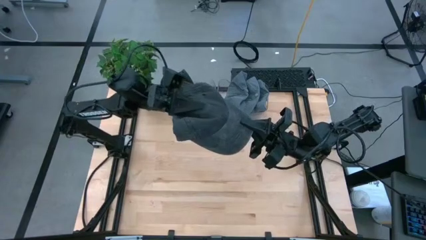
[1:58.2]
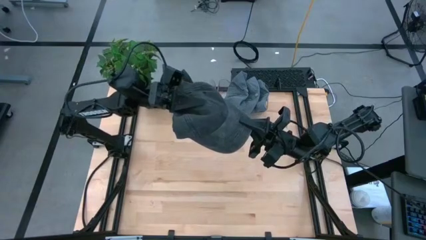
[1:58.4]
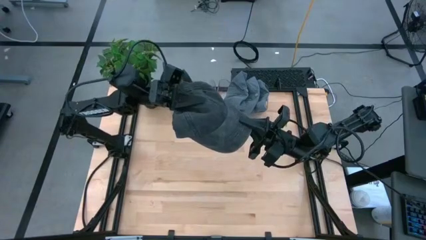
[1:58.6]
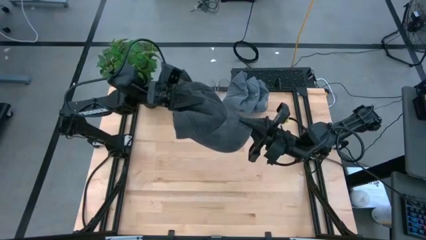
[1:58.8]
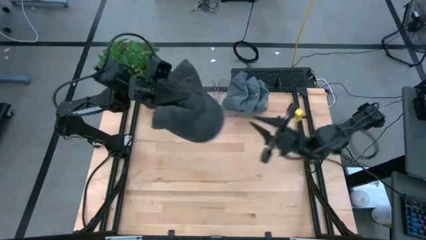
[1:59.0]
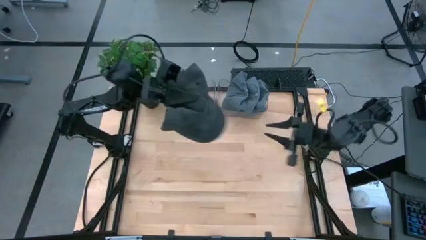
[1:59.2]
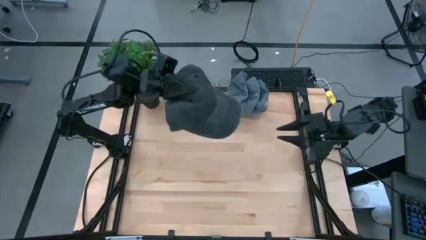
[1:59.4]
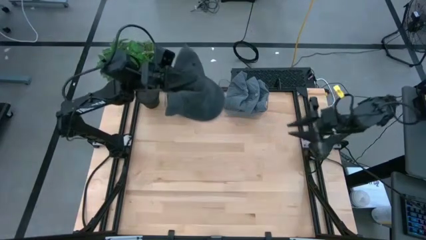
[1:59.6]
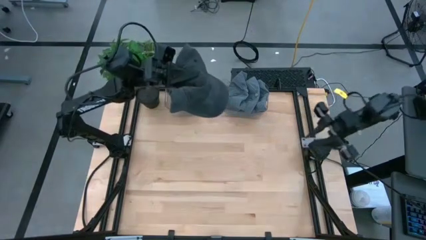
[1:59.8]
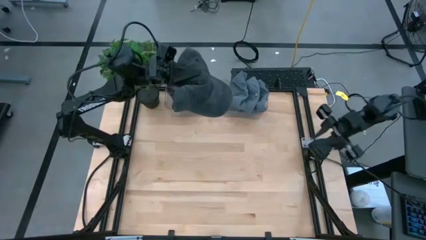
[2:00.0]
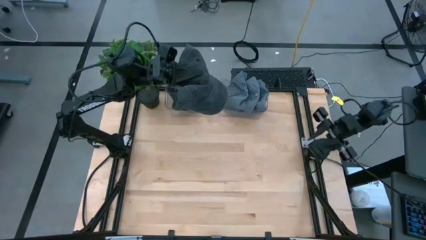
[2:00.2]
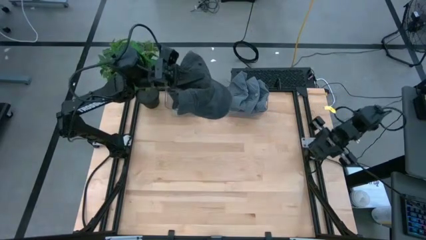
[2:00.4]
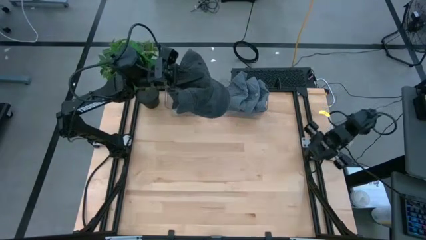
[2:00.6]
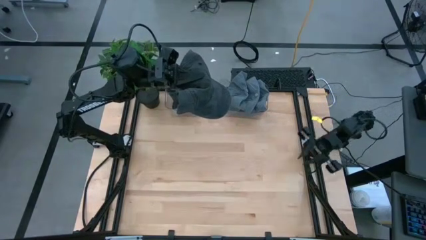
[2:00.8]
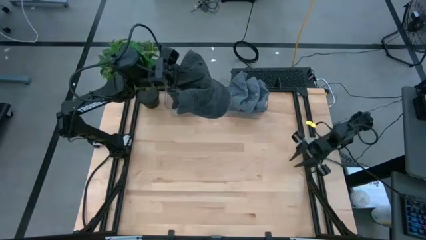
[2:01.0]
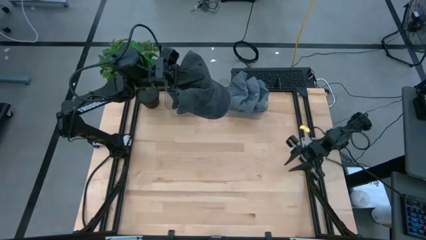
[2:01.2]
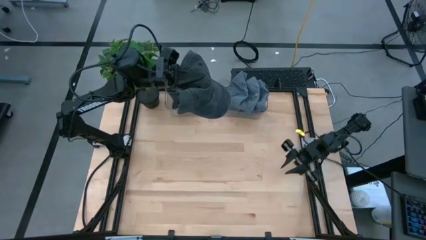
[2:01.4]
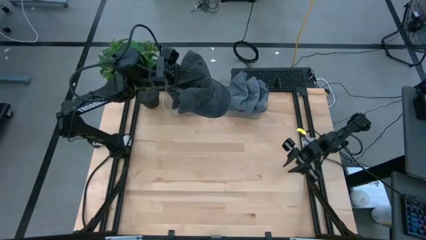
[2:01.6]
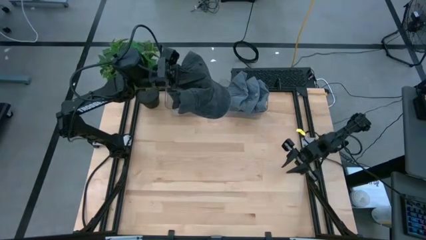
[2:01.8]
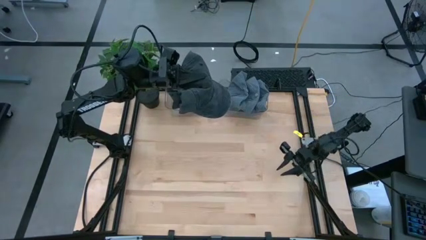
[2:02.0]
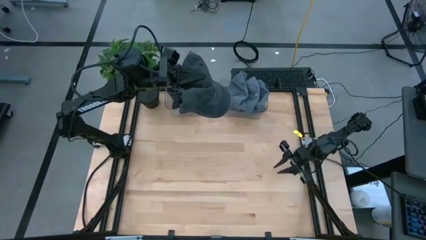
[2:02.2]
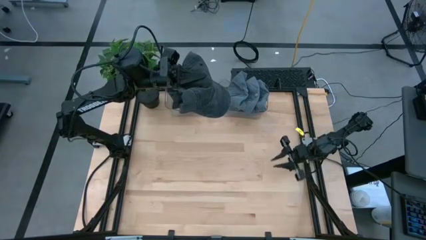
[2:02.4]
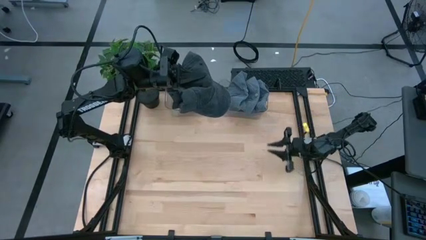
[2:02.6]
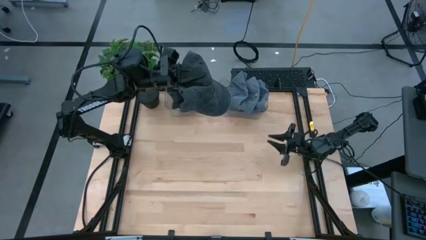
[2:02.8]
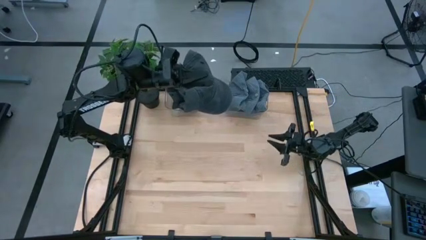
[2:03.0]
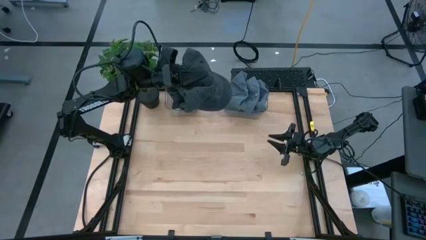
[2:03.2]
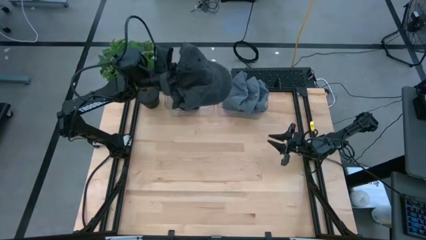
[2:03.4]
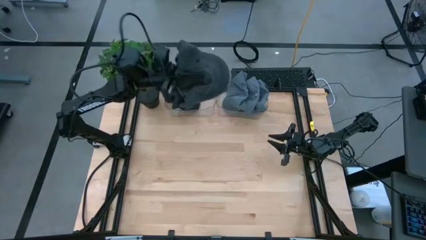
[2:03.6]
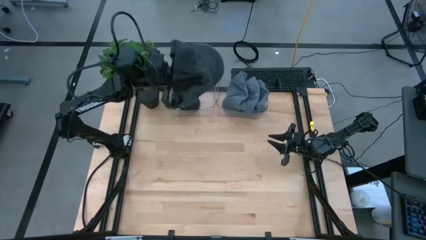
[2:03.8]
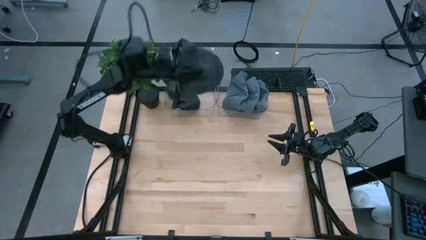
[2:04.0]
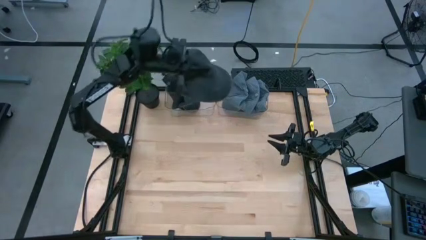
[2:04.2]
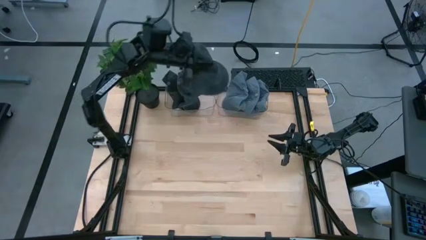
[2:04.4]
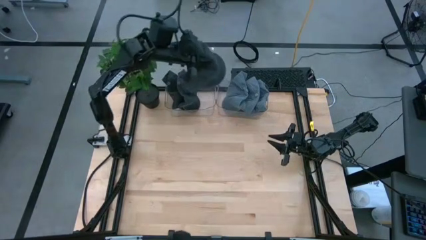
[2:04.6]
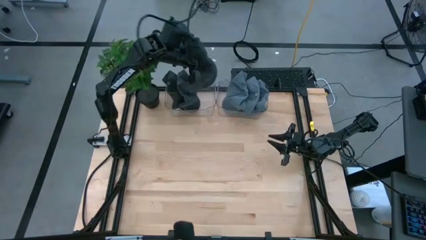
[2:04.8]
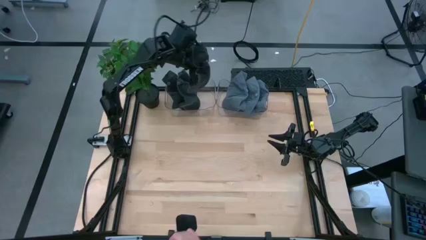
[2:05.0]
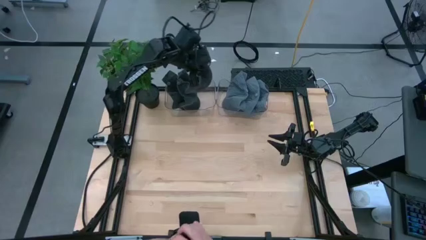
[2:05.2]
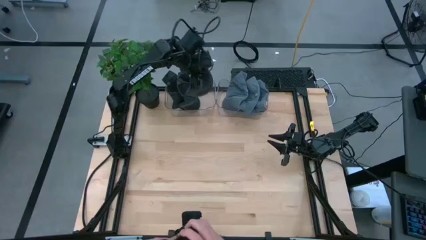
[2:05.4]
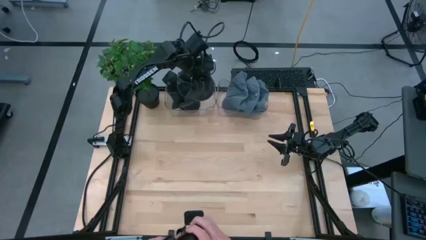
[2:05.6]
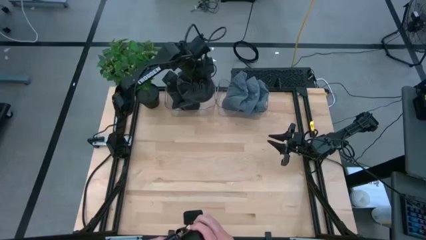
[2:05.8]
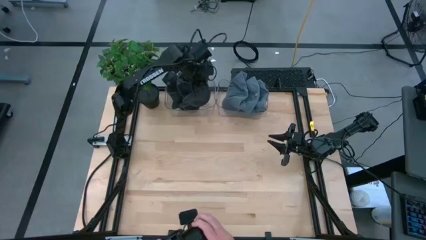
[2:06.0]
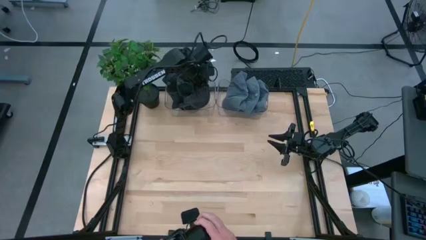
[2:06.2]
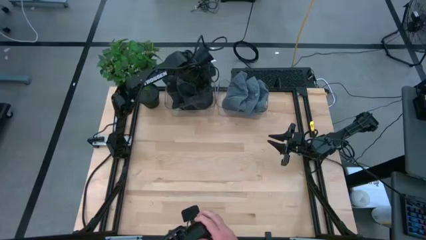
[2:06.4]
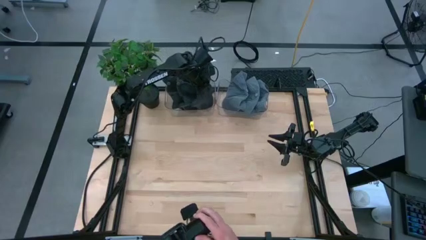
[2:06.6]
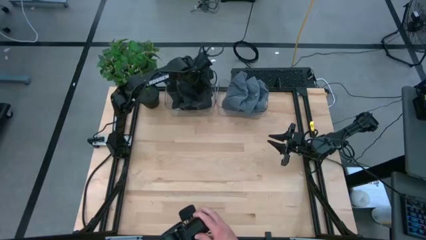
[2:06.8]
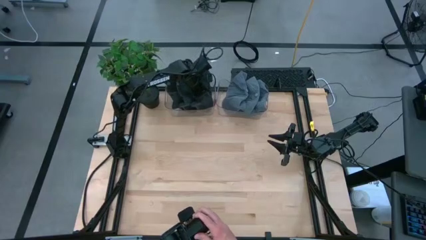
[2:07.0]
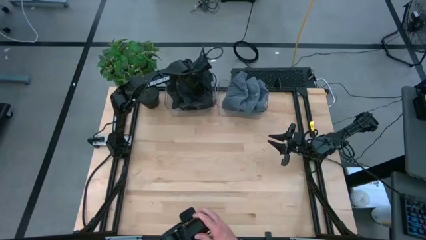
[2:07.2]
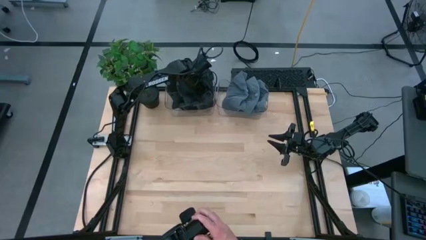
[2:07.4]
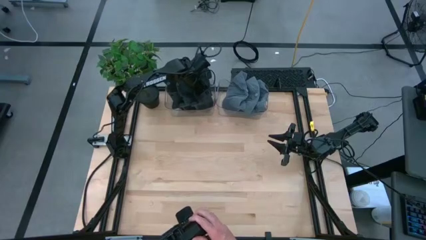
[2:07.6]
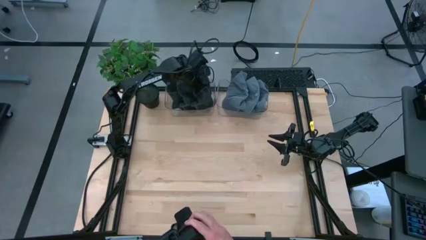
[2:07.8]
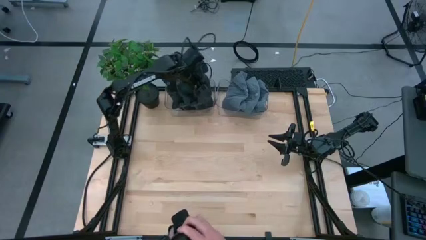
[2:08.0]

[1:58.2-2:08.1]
Task: Pick & Place hat
Put the black cap into the left transparent bin

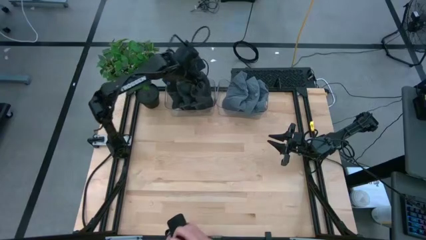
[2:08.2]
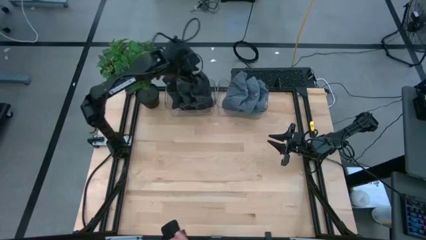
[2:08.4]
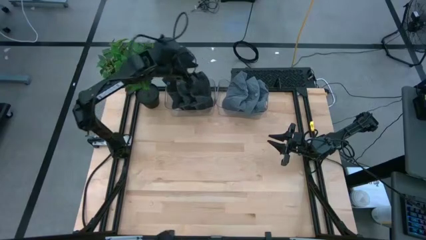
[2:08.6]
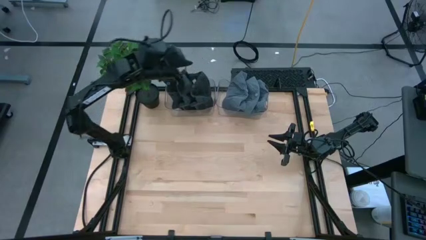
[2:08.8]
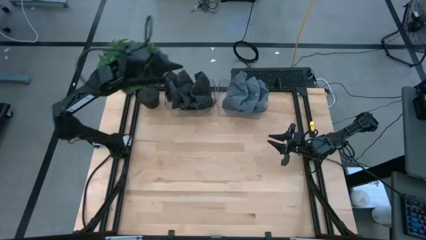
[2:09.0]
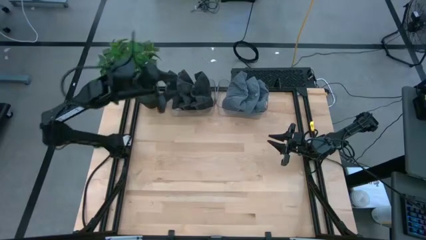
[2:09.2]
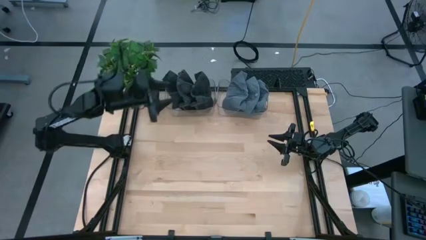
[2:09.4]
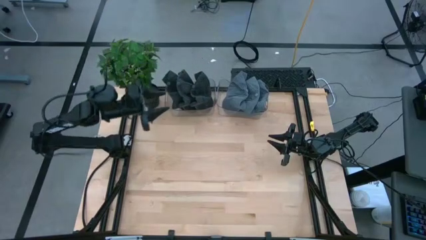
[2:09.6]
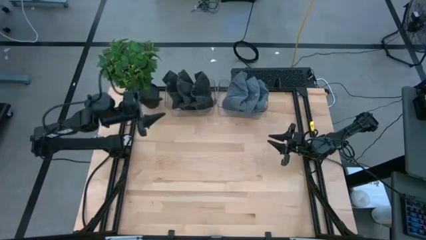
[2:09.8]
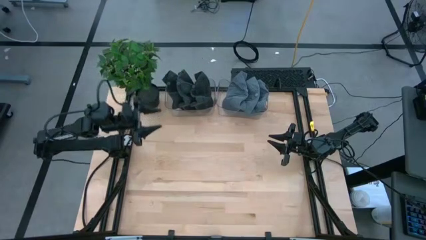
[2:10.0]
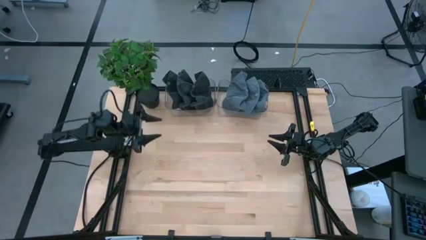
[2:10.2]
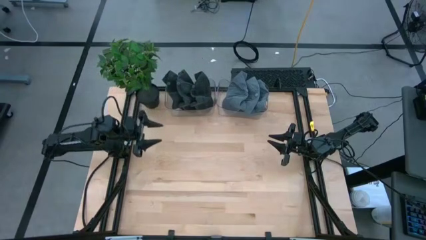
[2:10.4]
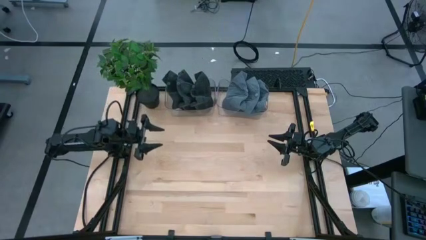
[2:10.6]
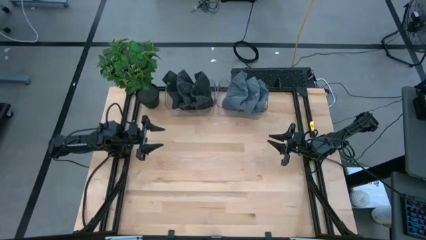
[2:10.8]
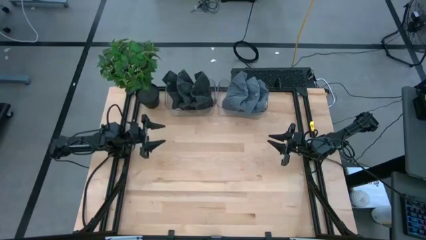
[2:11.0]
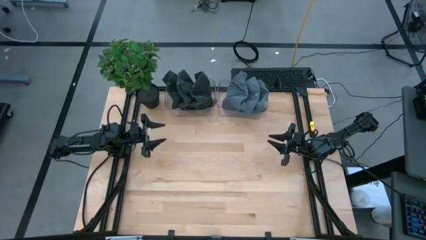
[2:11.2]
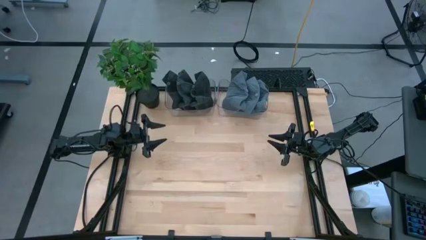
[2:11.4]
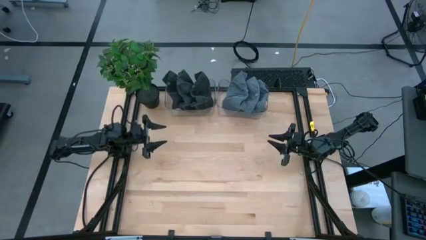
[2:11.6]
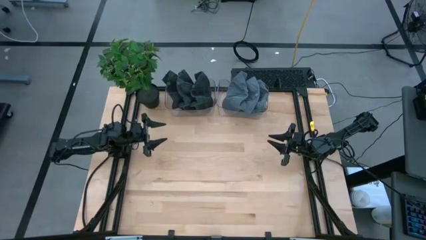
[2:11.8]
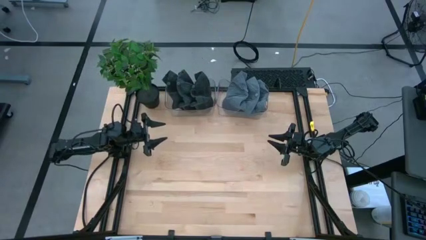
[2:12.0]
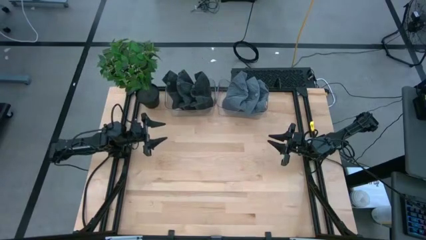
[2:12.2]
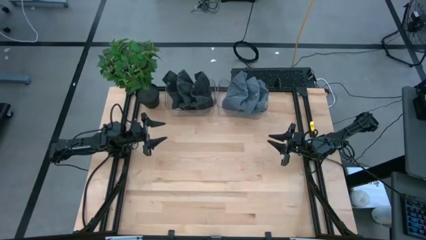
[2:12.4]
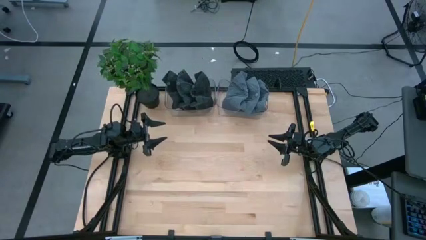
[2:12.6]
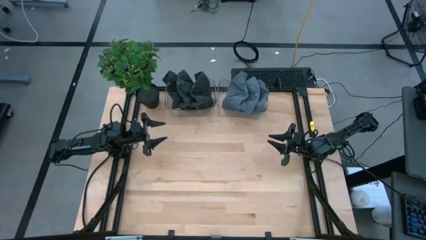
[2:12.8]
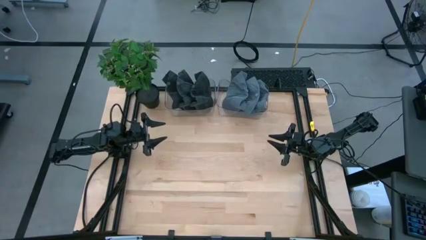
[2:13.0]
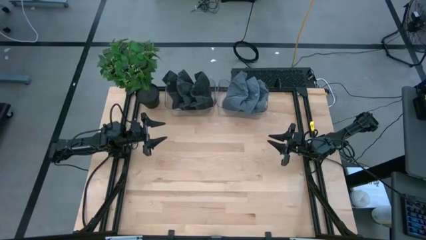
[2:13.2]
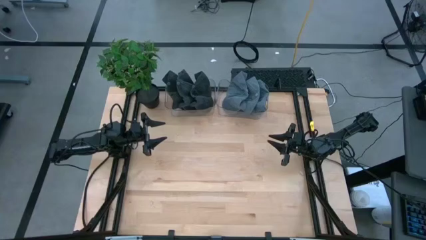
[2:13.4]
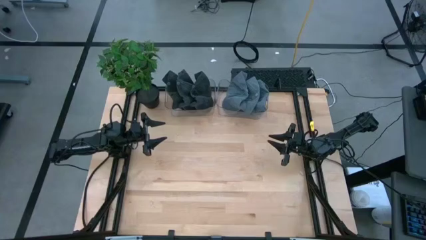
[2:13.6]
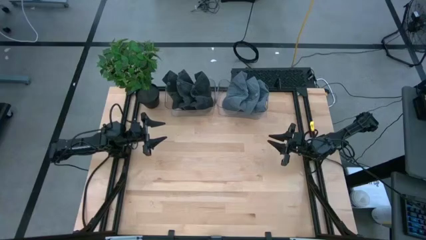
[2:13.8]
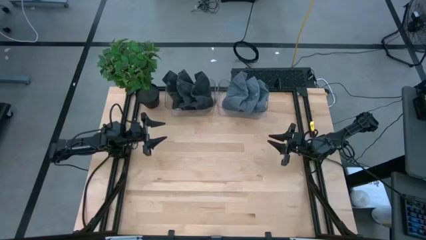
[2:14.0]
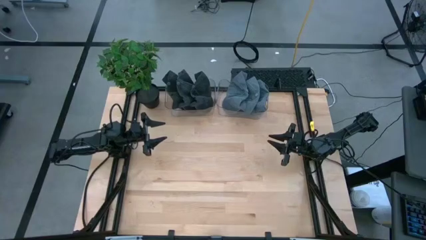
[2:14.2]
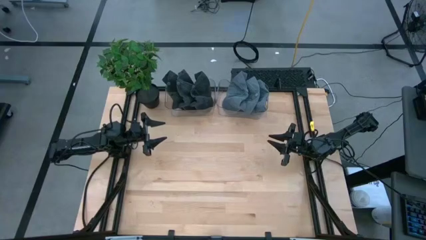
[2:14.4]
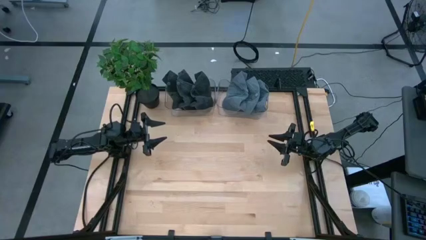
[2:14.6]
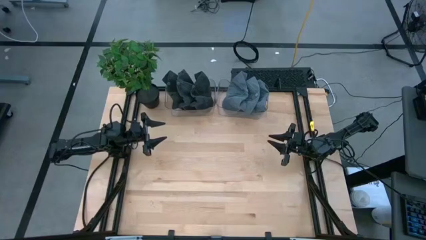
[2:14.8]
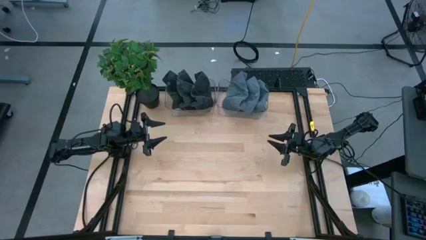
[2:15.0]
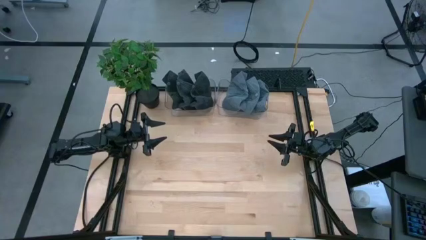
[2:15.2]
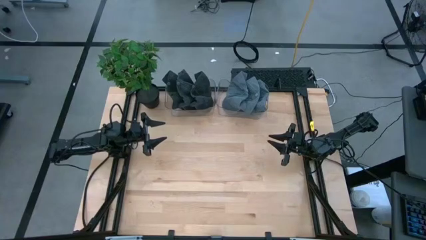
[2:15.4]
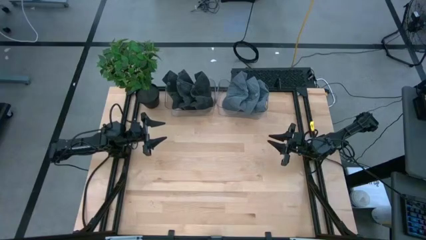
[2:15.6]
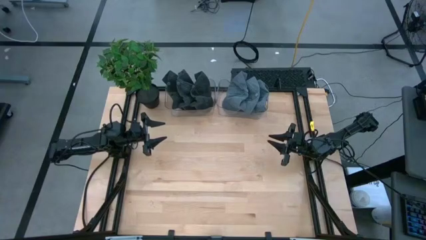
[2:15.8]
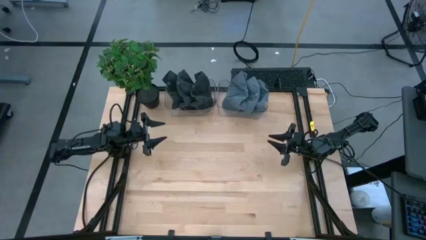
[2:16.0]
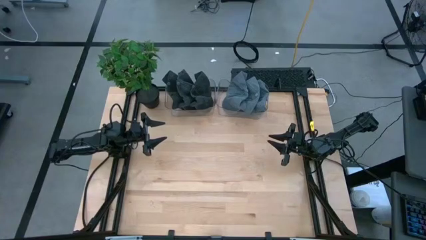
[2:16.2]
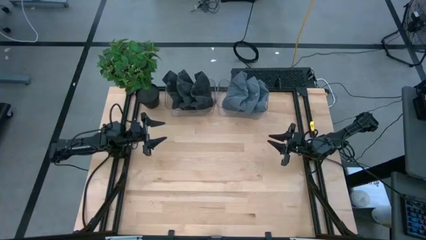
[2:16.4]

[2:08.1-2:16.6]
Return to Home Position
